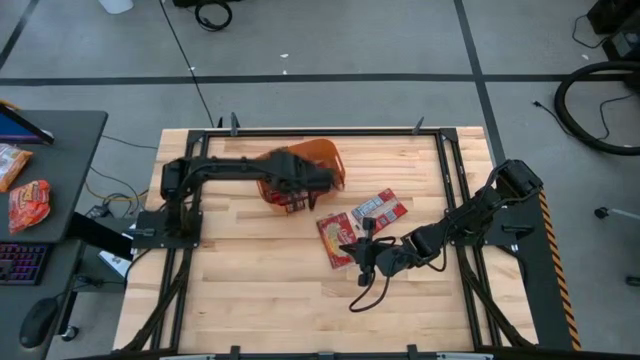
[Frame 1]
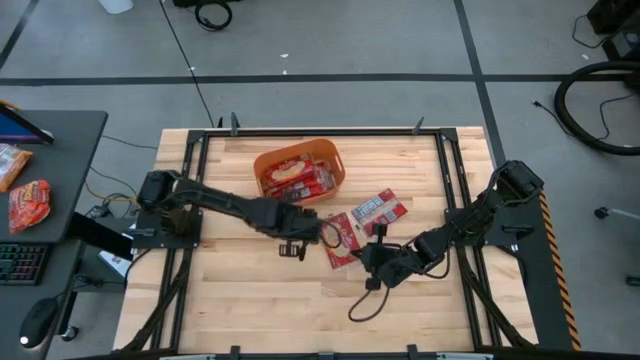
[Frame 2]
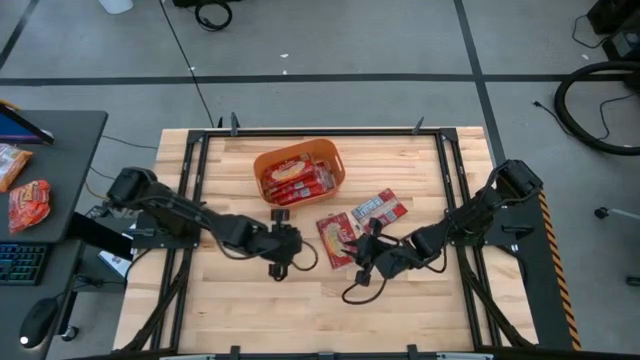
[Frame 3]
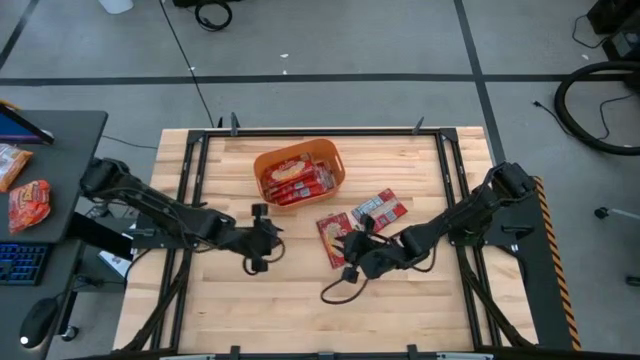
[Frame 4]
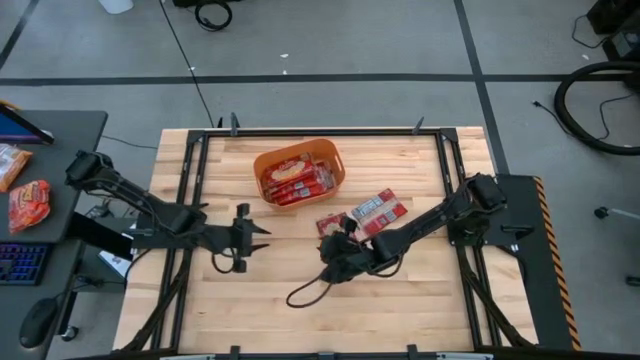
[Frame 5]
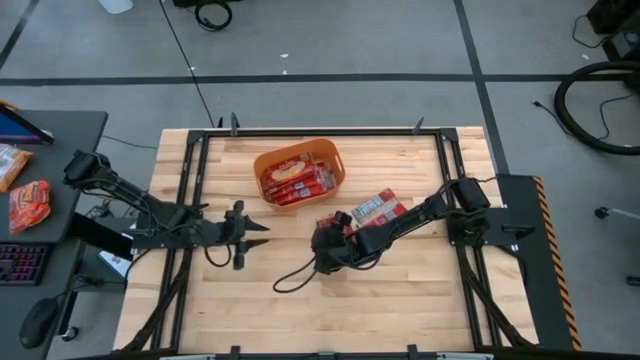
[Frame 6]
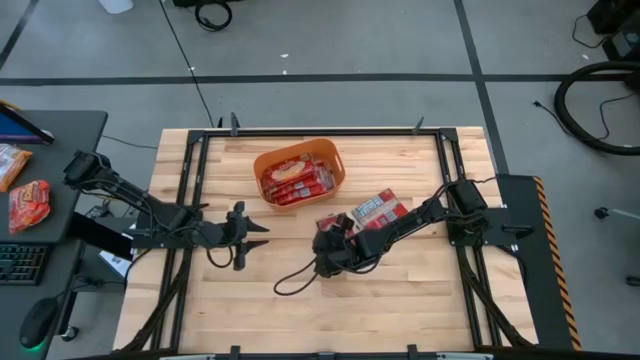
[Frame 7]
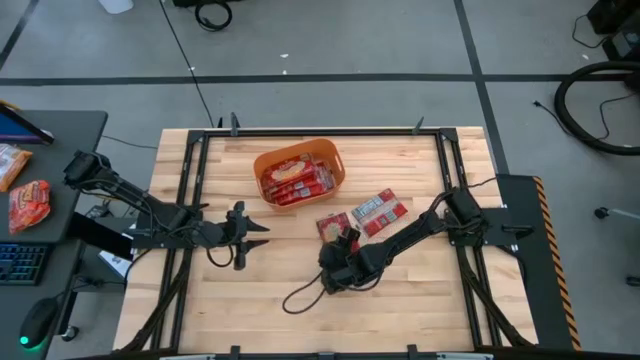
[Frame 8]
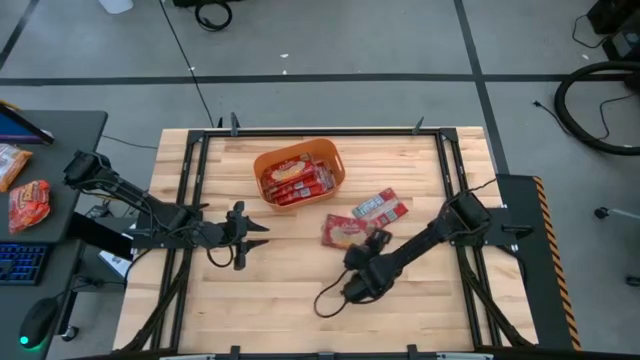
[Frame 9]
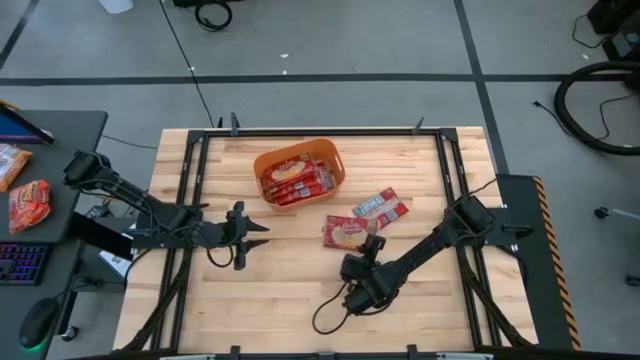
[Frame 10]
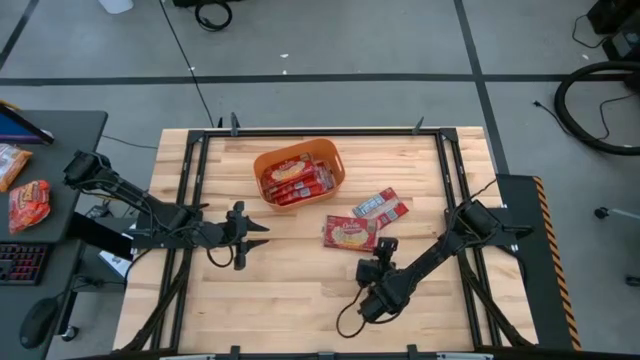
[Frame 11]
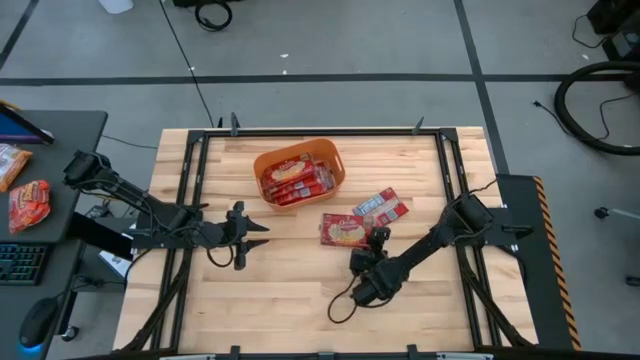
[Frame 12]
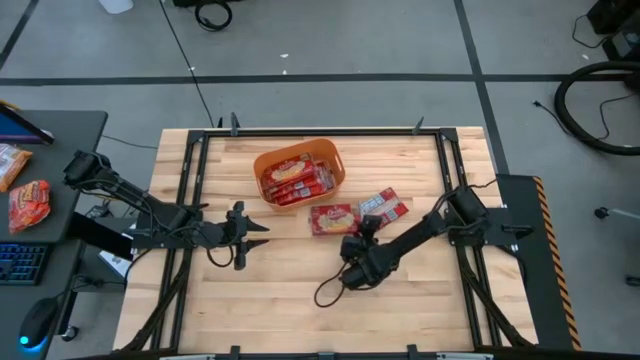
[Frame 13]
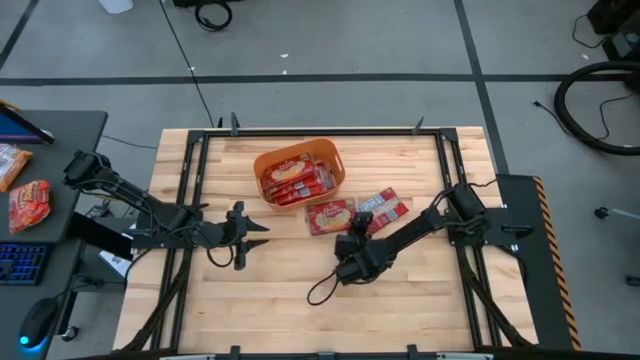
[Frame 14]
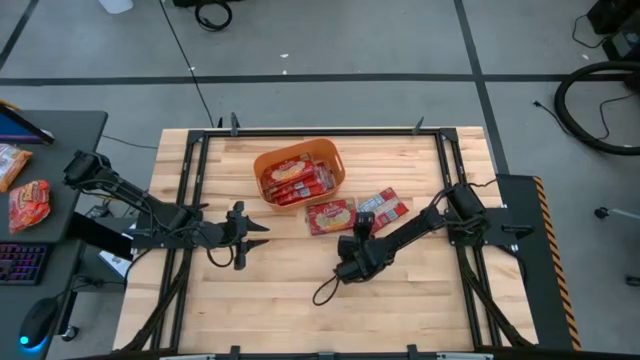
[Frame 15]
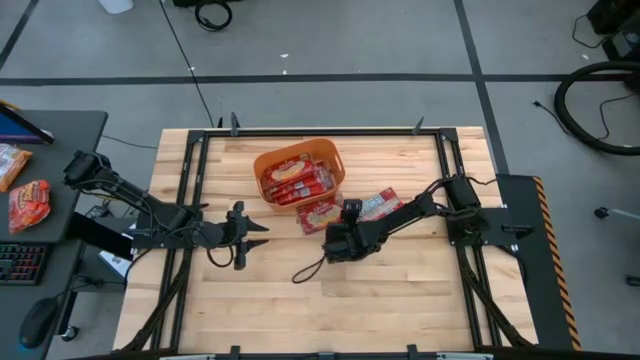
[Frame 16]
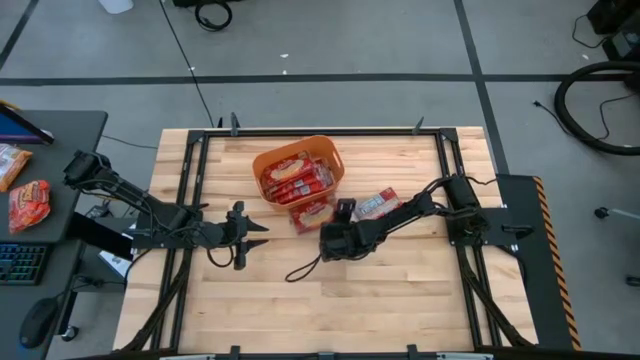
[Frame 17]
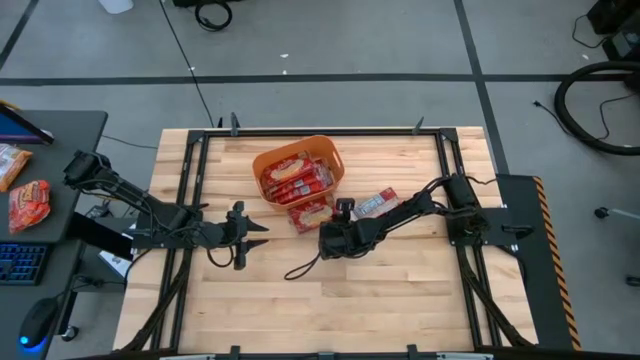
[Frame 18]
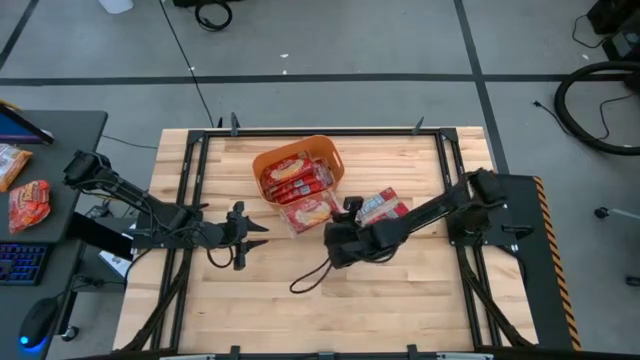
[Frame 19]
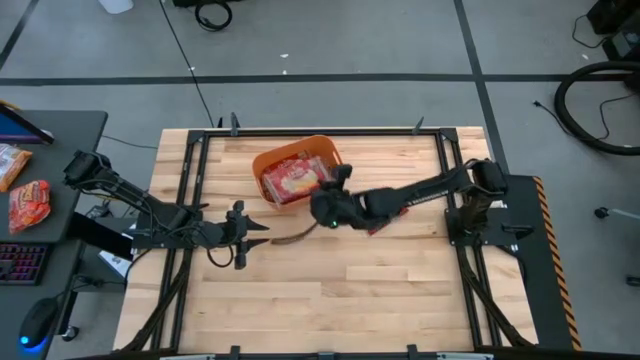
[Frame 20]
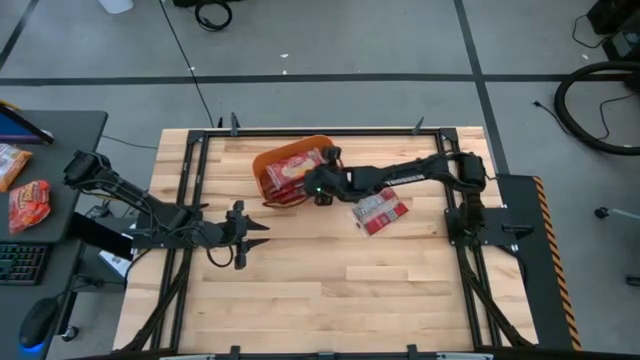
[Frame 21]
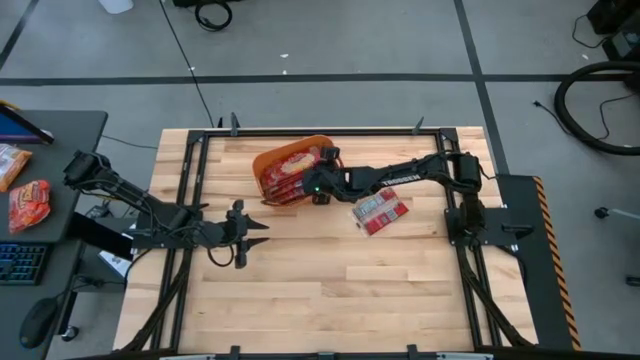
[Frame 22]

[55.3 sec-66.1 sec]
Task: Sort popcorn bags into baskets
Put the popcorn bag into the orange bin

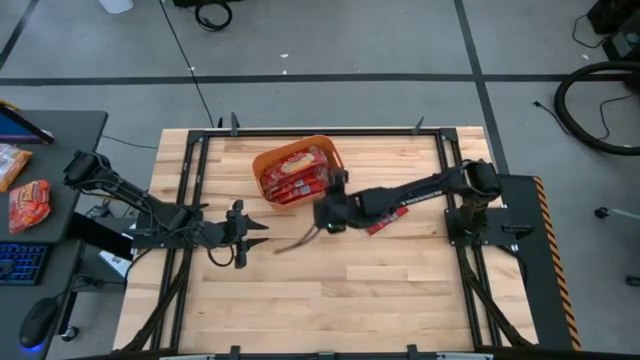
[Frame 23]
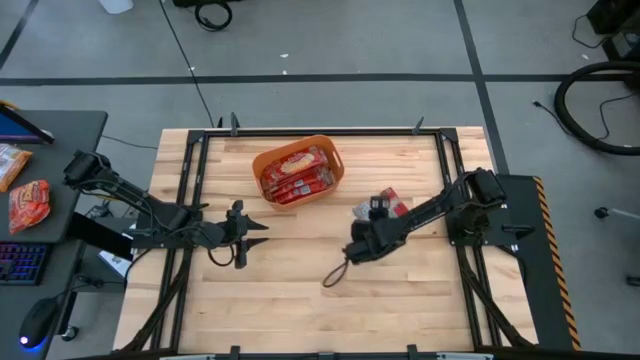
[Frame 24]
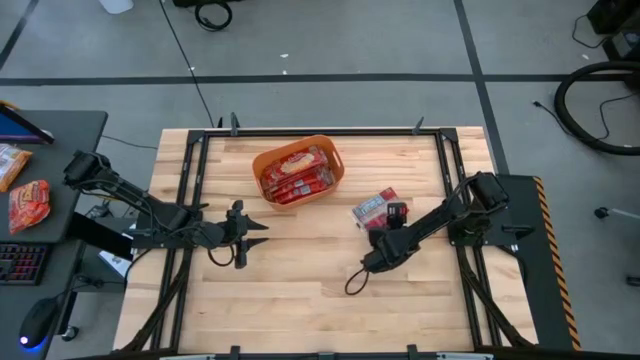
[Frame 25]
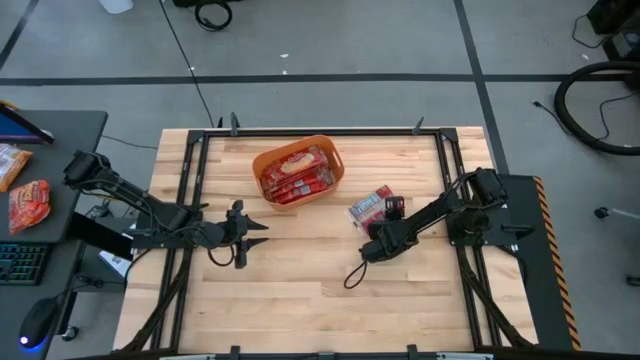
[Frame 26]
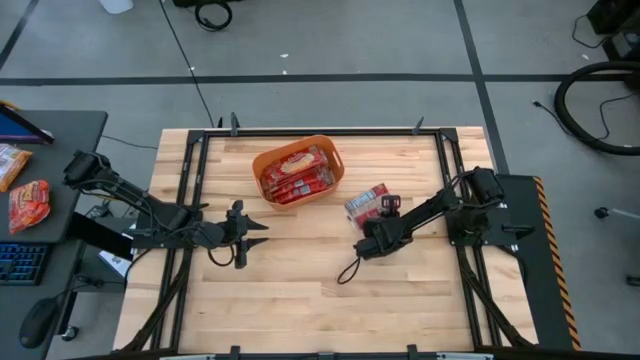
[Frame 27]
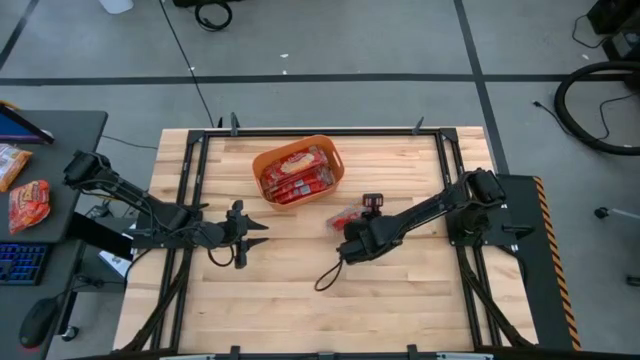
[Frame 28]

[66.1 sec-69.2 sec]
Put the popcorn bag into the orange bin

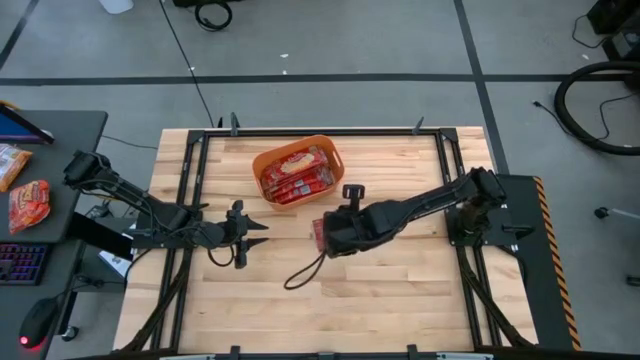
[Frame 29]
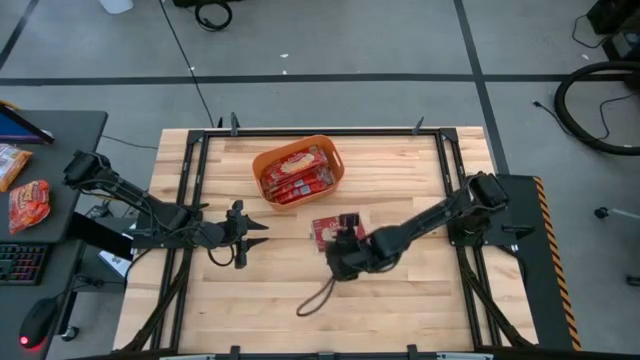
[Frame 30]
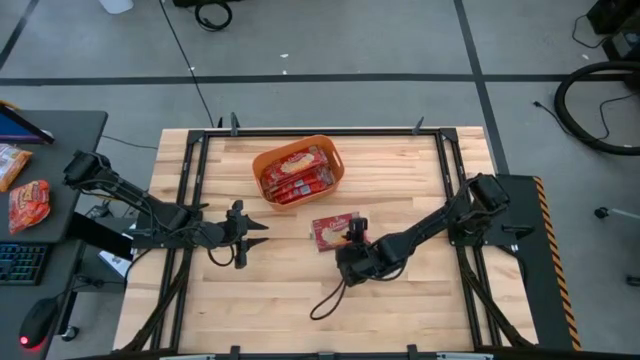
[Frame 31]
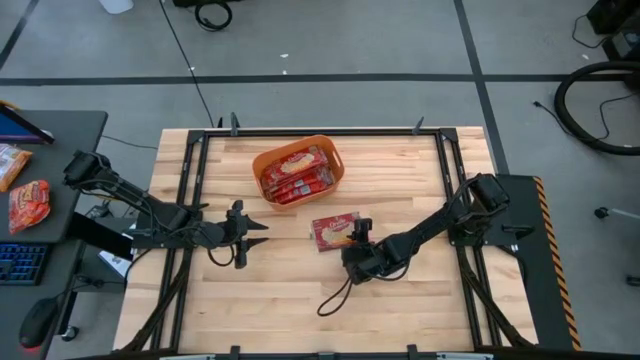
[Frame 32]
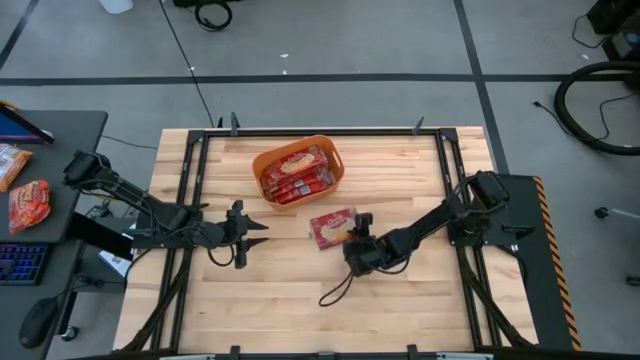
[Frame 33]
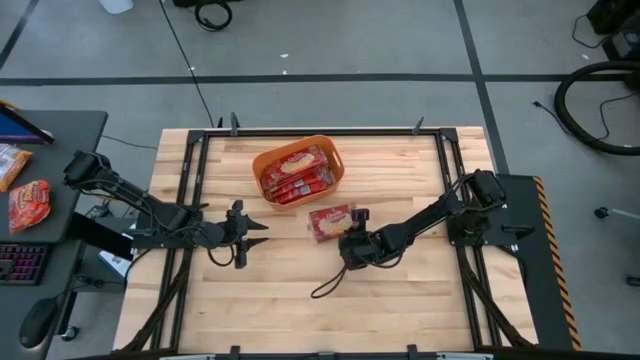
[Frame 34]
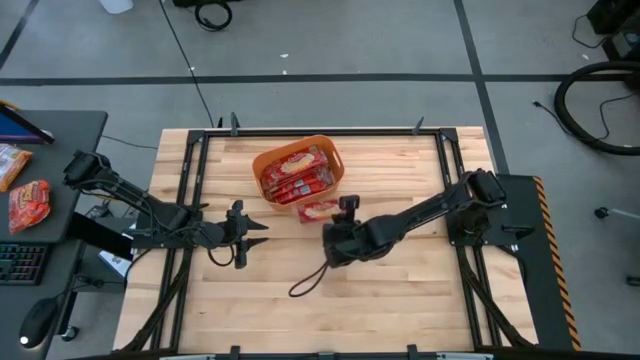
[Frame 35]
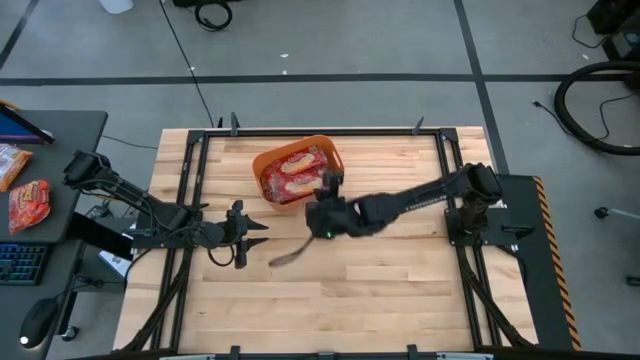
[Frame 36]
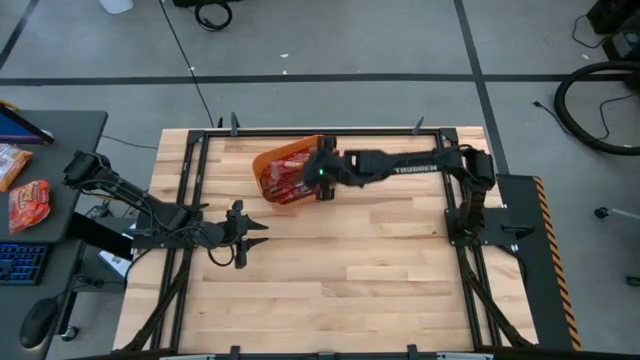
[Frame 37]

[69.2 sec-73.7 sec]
Put the popcorn bag into the orange bin

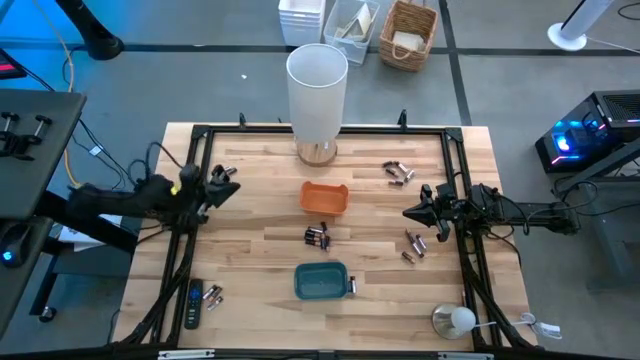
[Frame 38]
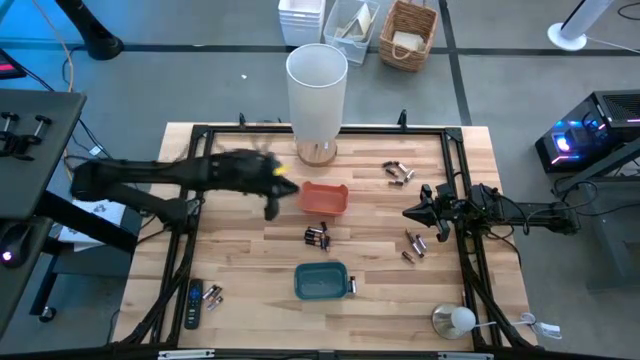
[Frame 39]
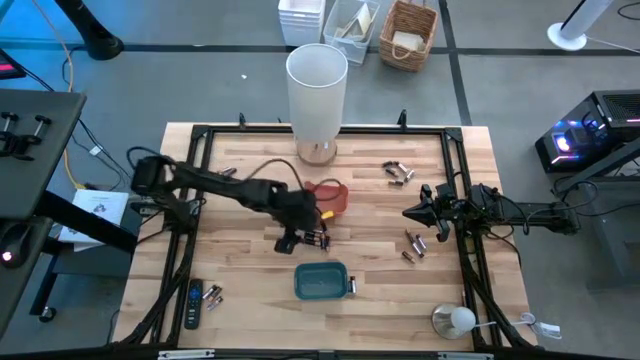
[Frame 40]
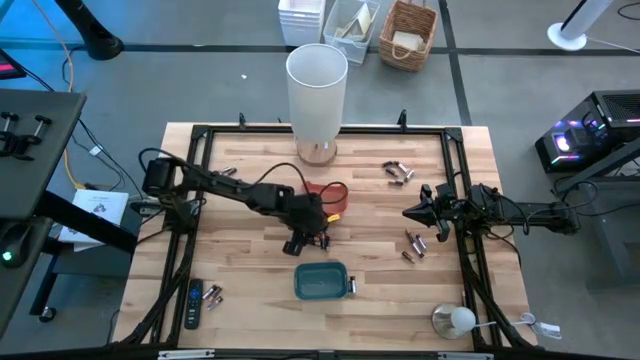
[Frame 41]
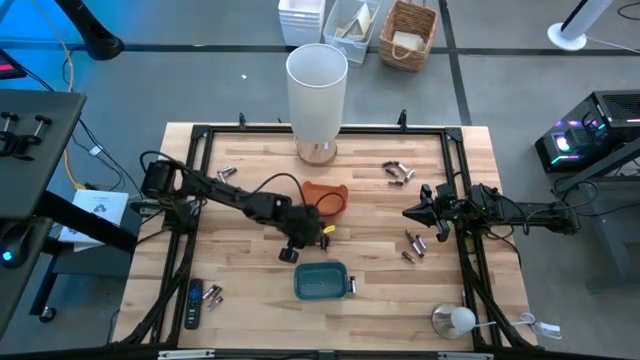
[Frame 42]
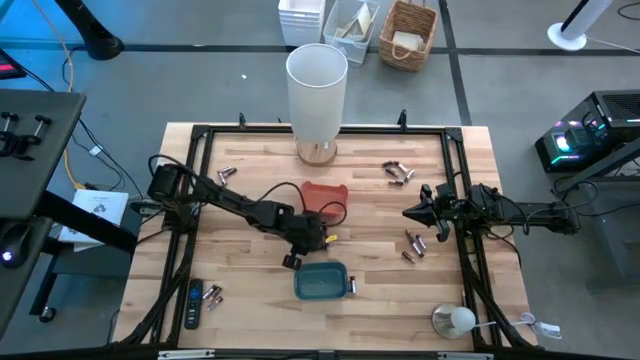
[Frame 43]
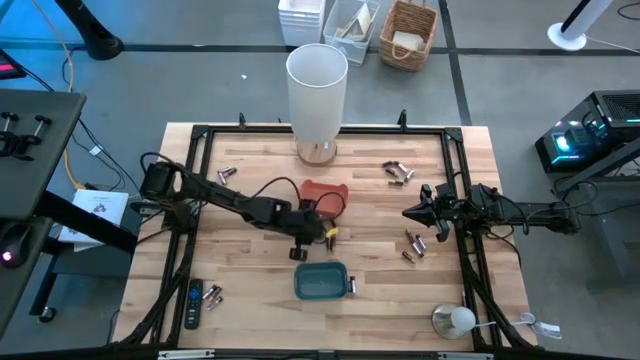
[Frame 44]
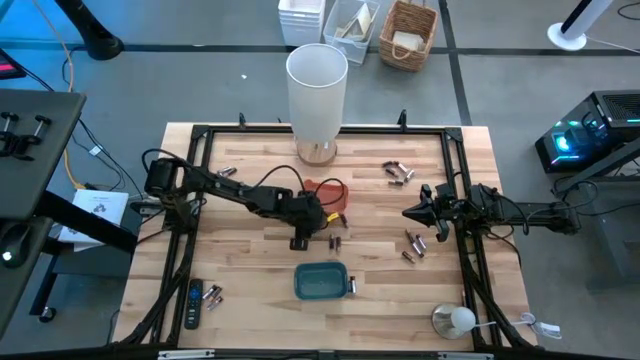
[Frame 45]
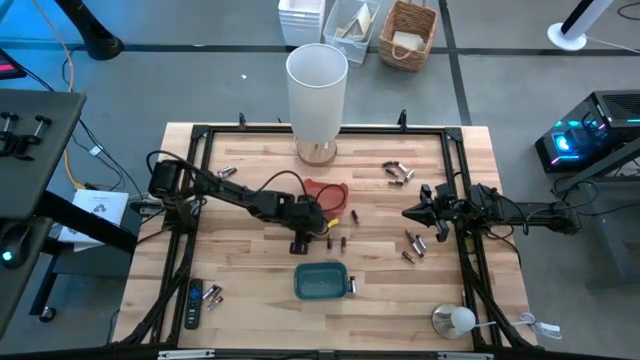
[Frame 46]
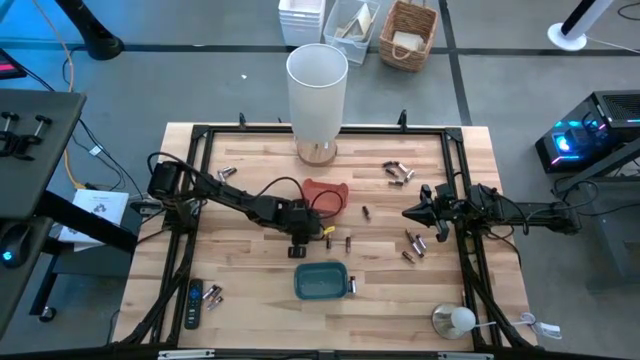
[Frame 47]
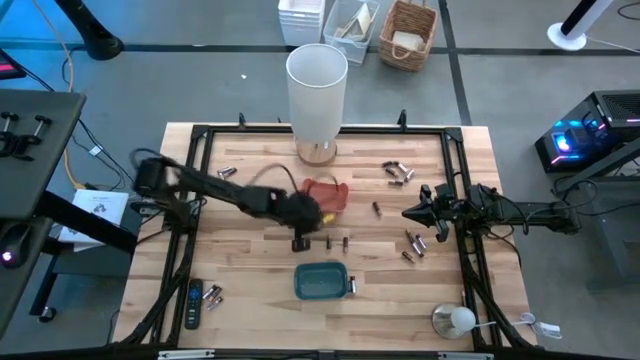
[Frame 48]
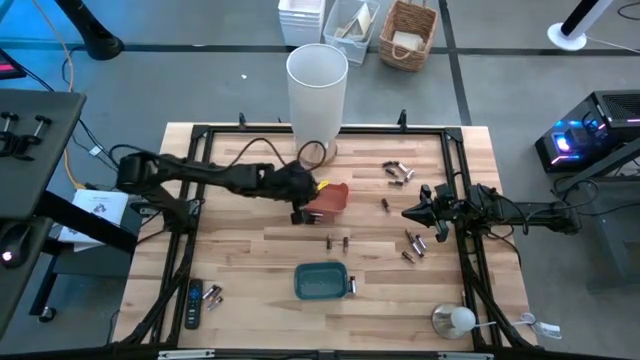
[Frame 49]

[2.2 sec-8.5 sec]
Task: Sort batteries
Put the black battery into the orange bin
